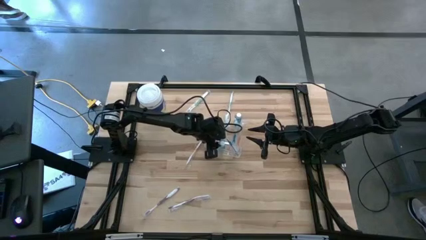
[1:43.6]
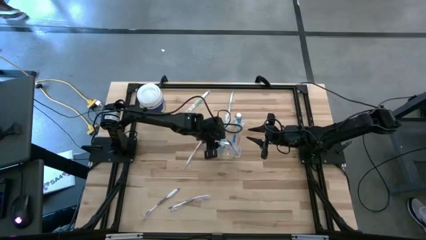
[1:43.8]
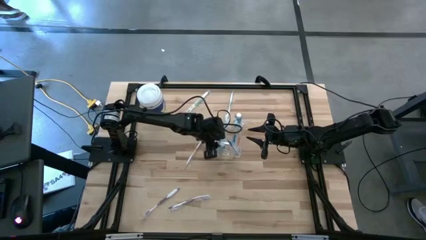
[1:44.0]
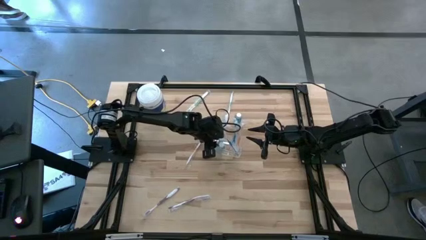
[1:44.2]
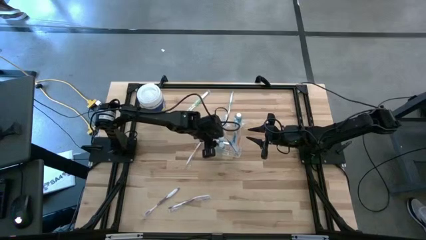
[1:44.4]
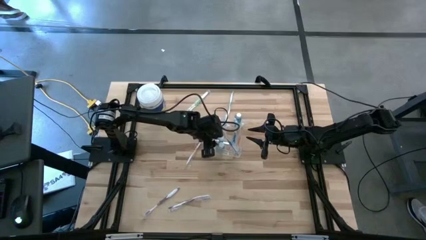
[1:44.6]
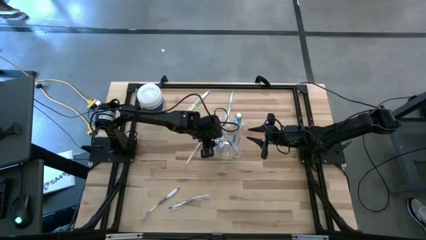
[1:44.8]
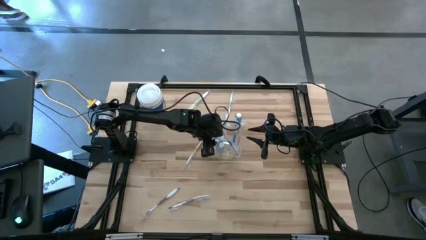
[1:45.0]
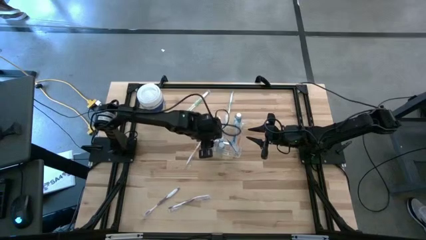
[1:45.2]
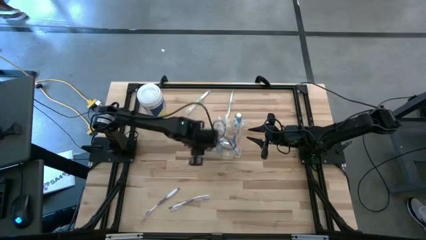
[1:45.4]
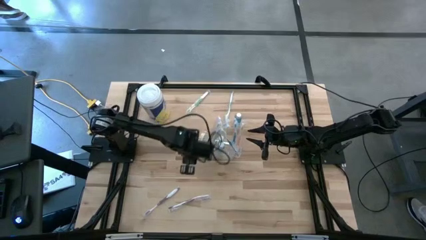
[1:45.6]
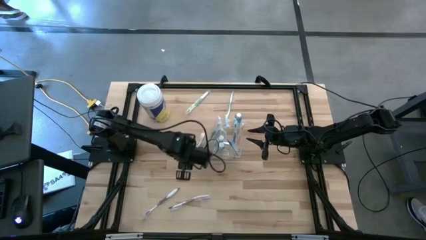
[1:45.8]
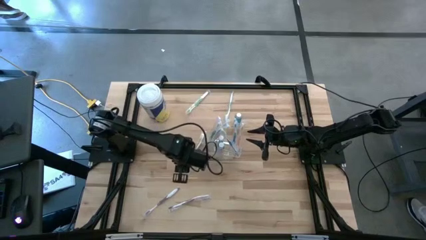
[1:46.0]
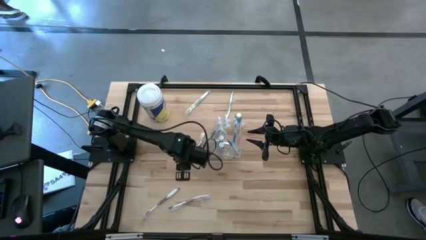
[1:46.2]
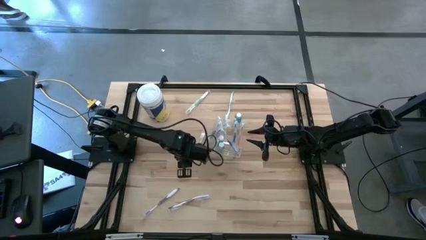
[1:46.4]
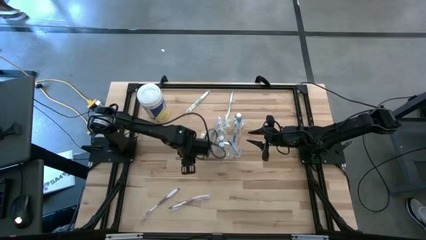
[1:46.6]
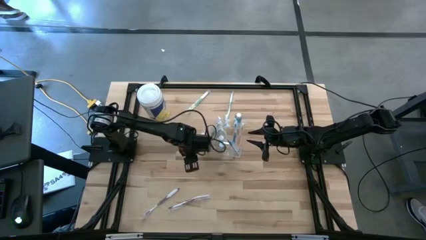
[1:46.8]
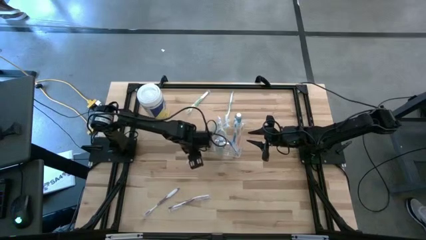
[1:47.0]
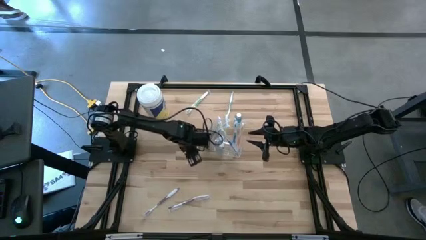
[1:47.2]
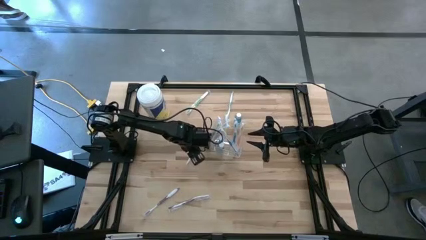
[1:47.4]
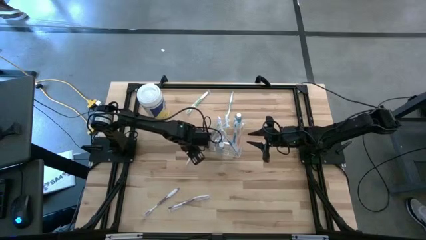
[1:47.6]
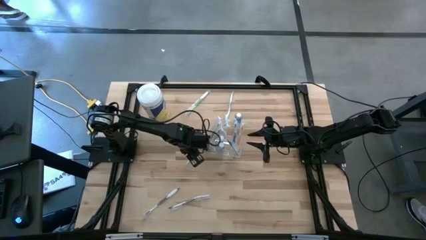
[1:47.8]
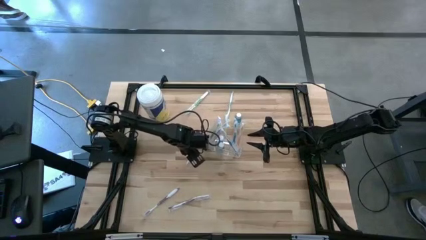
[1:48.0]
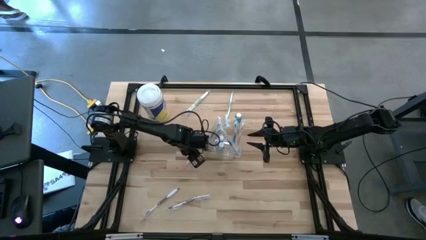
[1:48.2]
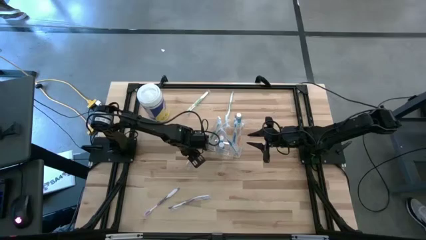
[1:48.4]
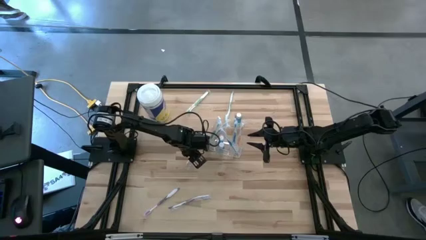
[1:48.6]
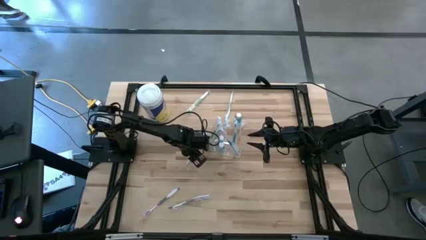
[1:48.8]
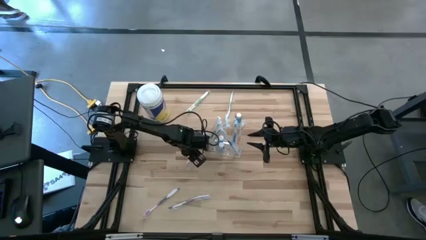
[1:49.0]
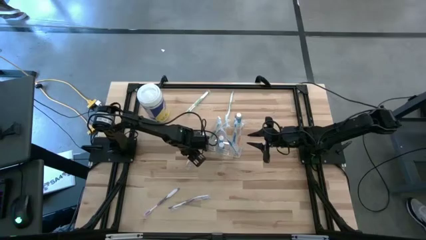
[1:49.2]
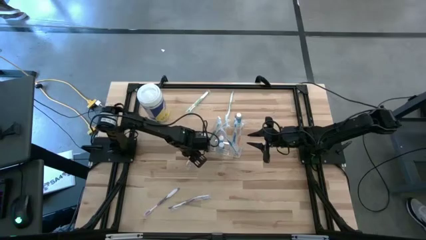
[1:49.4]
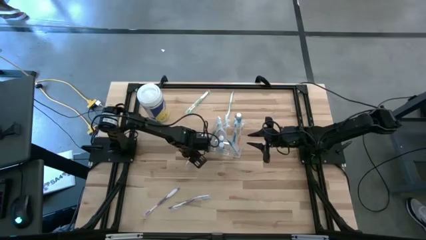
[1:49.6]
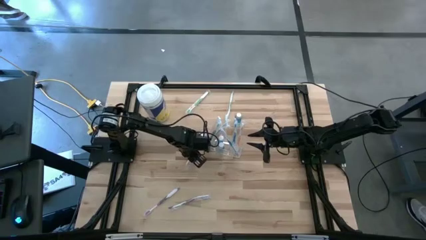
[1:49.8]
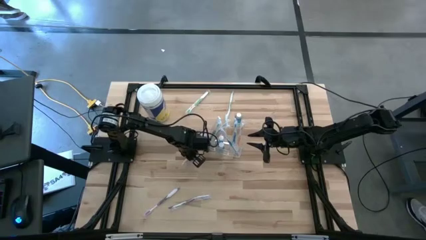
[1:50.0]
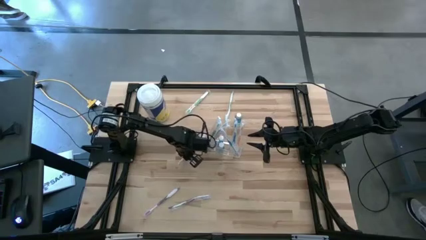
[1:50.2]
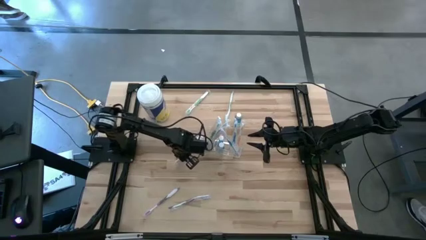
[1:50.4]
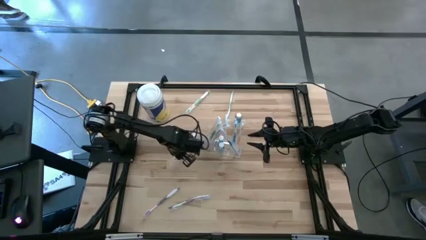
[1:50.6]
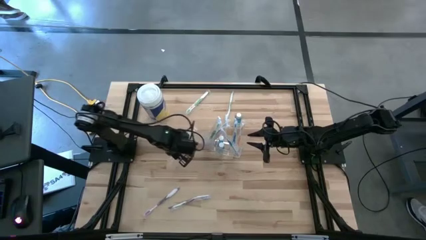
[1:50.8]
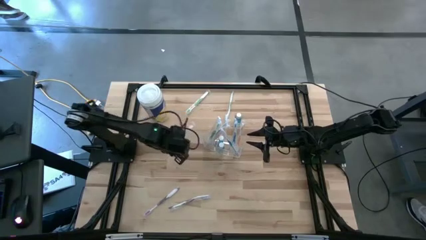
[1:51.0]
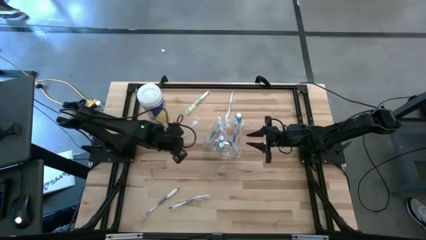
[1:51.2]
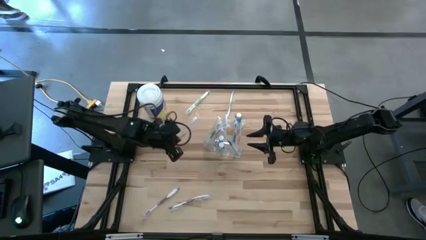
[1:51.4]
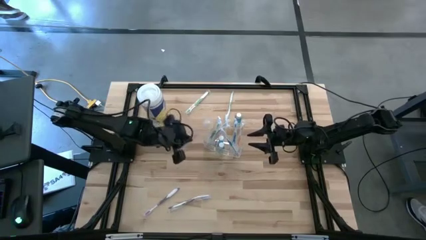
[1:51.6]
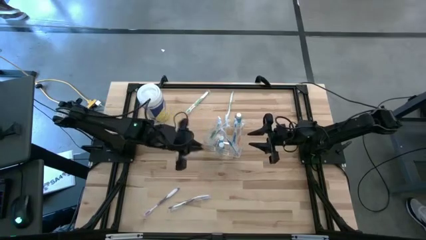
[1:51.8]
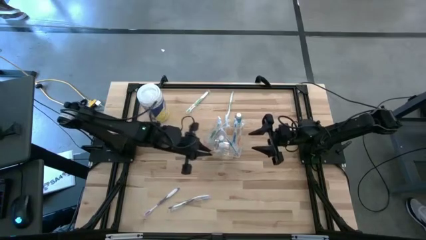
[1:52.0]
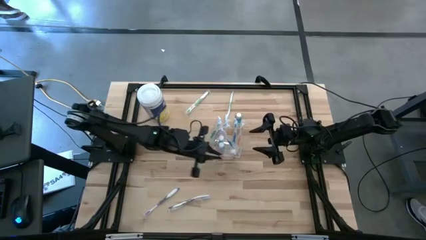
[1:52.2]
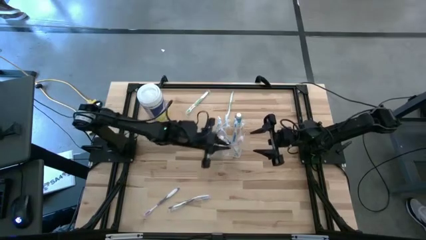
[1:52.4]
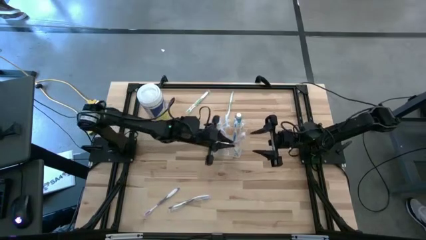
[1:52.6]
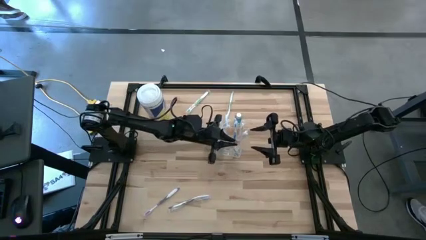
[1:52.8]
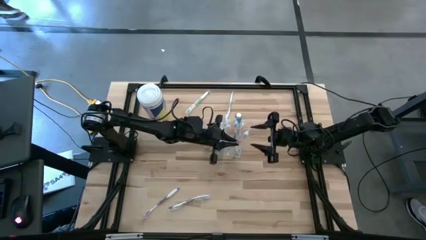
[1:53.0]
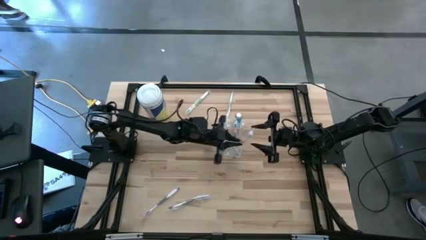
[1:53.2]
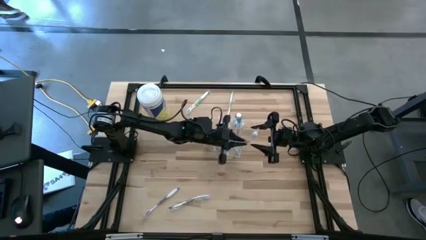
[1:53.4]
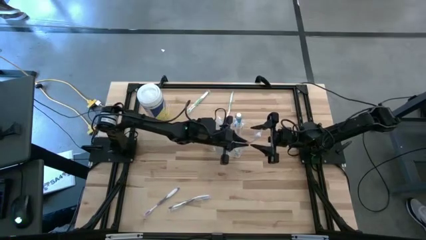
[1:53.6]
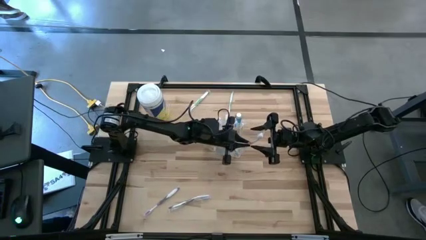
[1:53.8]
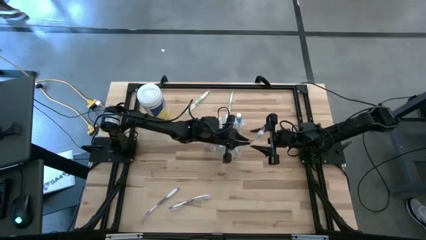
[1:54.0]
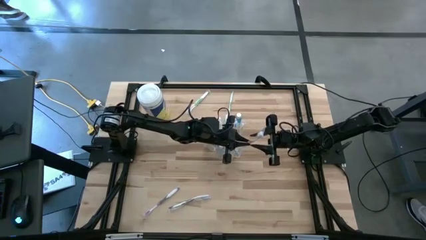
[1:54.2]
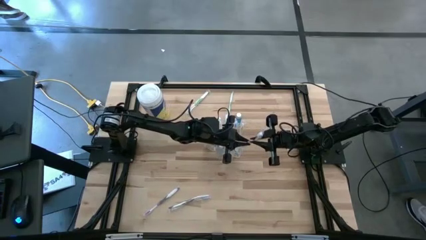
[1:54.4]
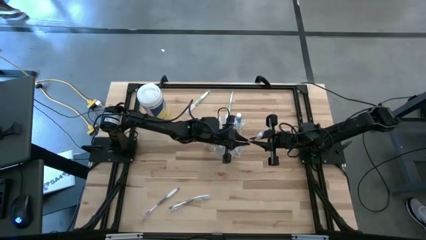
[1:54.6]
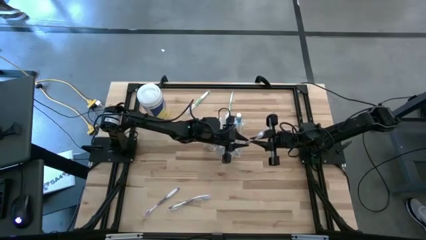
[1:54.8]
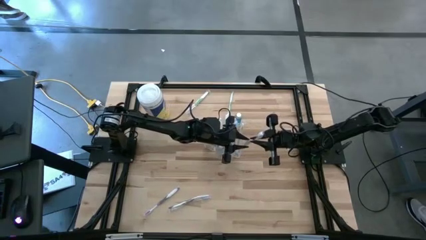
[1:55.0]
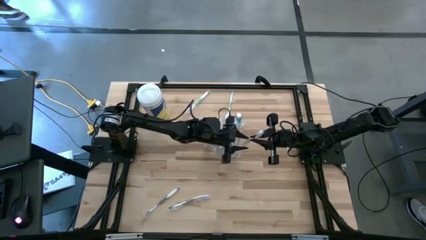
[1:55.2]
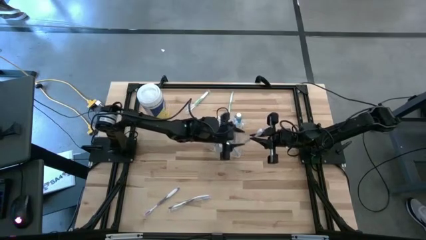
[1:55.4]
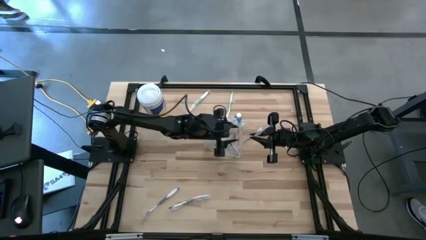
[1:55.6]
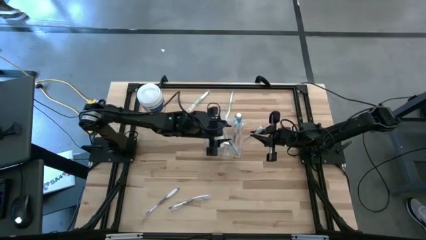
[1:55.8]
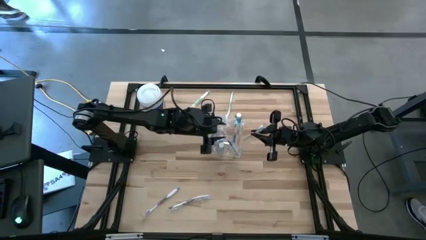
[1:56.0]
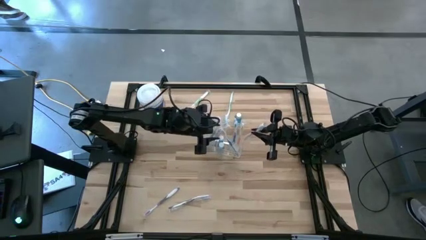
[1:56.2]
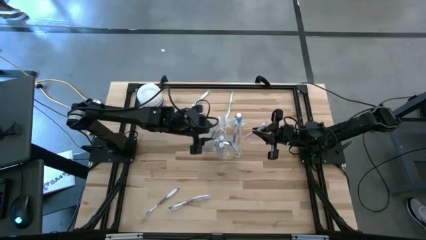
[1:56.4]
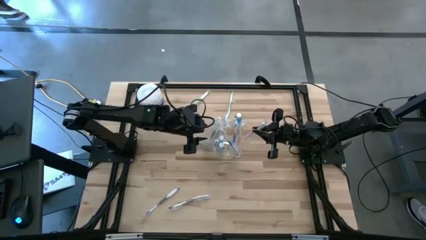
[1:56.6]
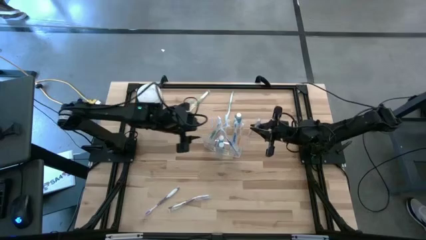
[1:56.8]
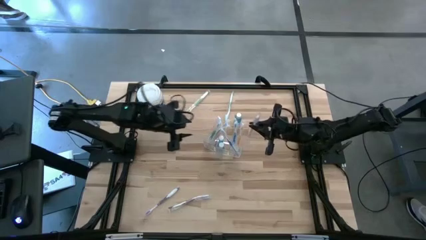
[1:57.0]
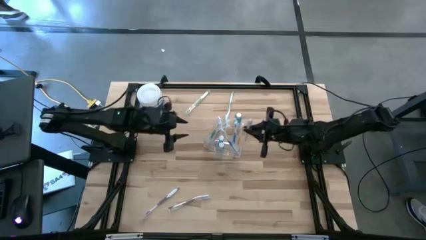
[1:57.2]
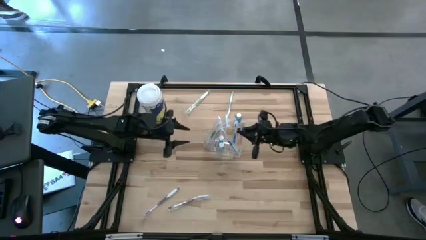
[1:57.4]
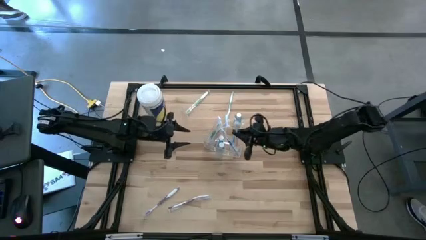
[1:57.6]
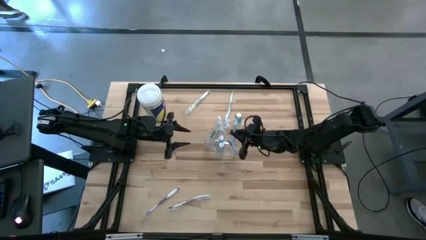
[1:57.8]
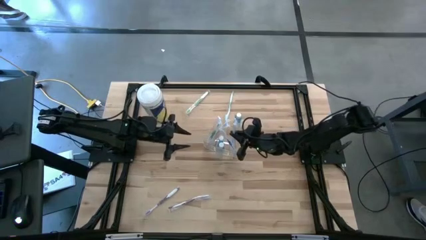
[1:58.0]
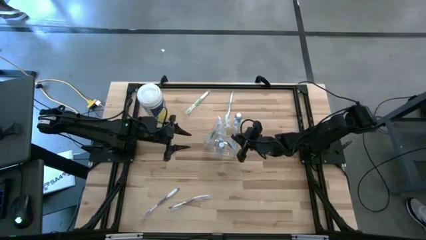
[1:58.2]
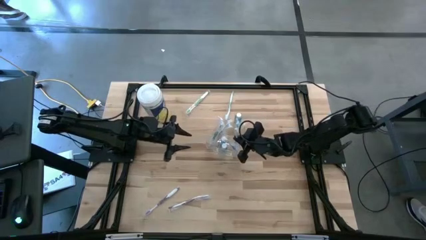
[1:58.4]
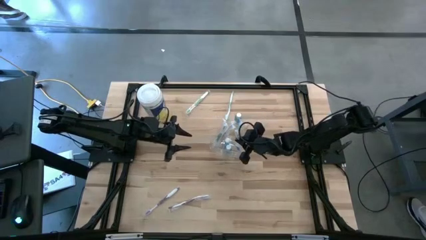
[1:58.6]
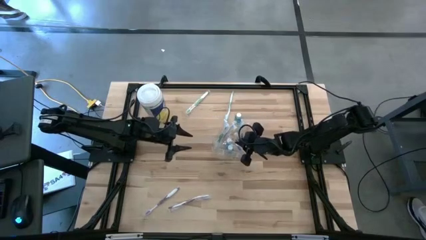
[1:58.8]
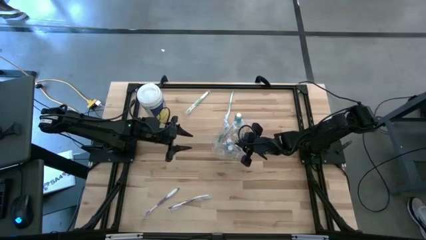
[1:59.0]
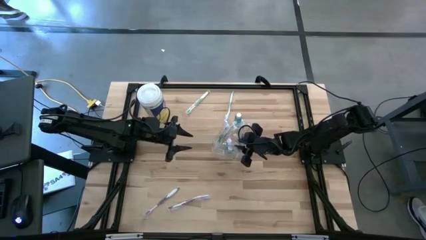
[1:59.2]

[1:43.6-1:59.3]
Task: Pick & Place toothbrushing station
Put the orange toothbrush into the right section of the transparent bin
